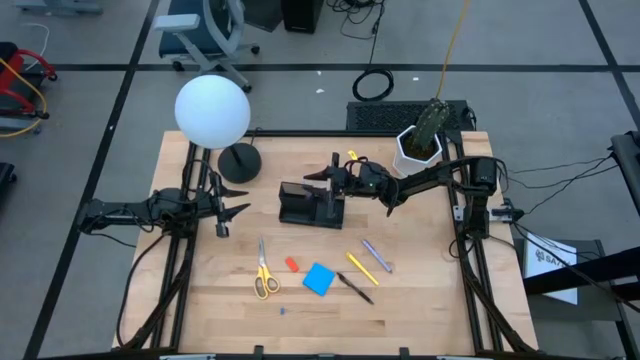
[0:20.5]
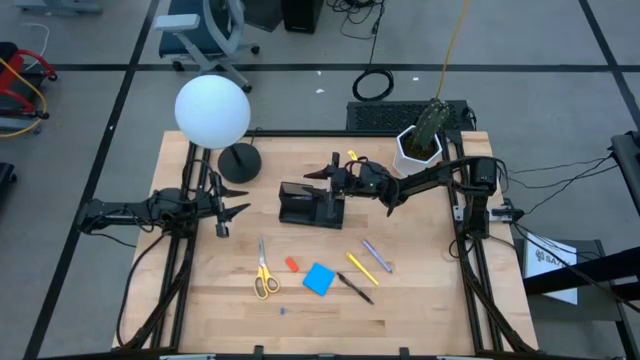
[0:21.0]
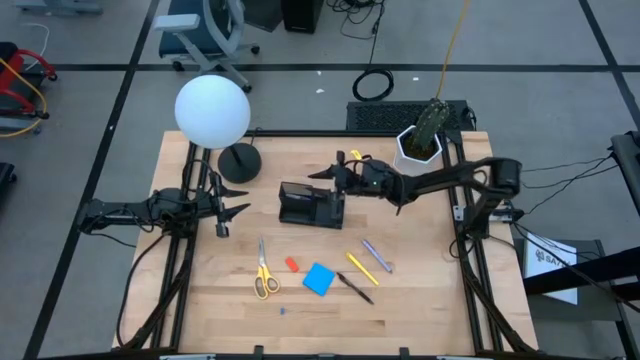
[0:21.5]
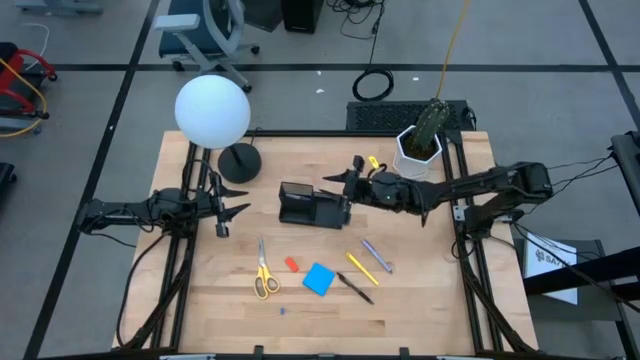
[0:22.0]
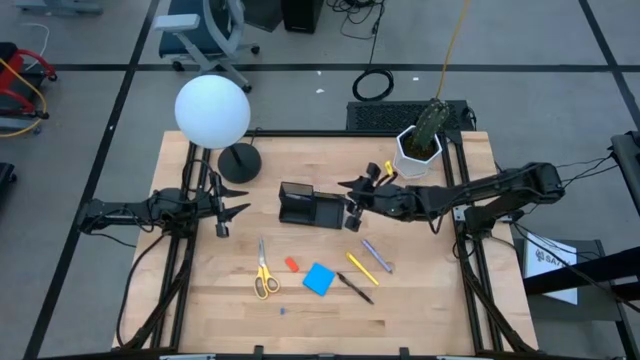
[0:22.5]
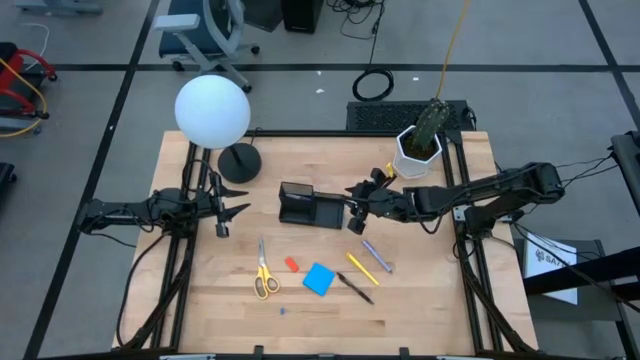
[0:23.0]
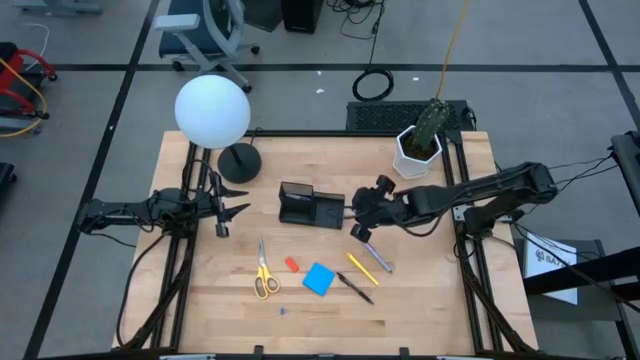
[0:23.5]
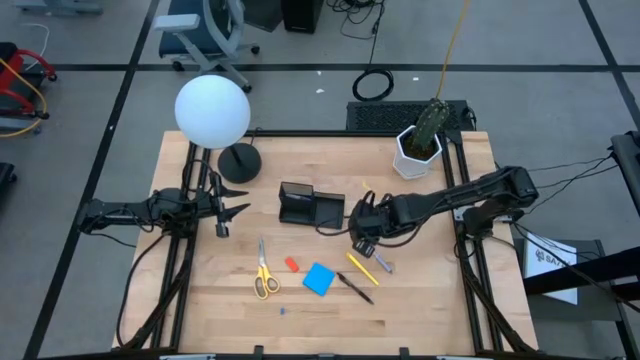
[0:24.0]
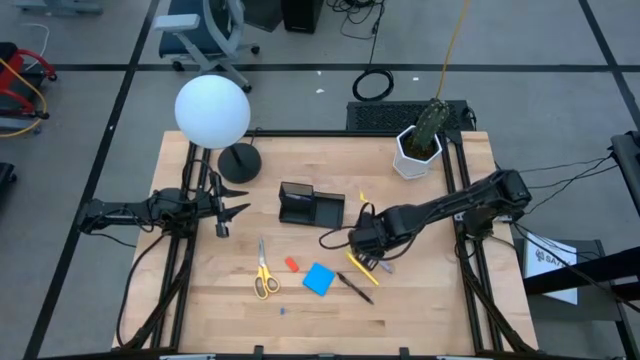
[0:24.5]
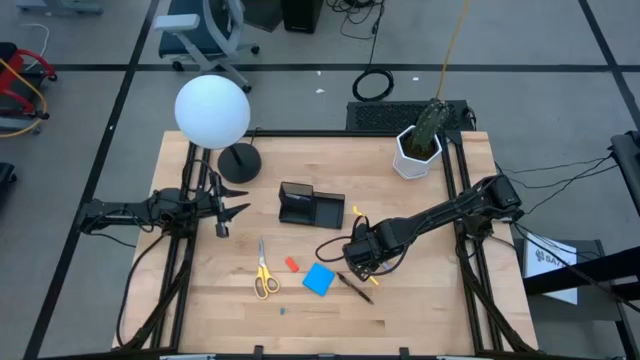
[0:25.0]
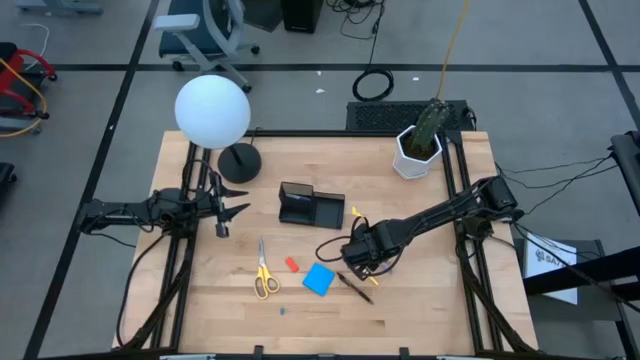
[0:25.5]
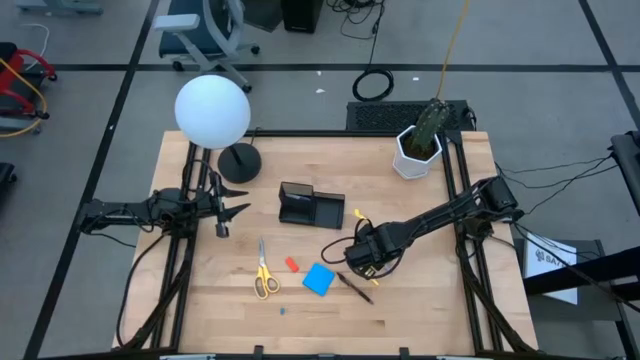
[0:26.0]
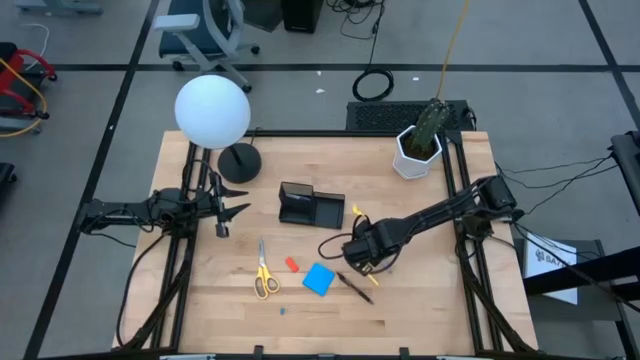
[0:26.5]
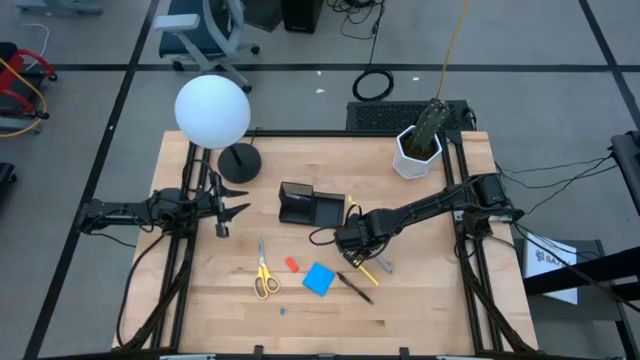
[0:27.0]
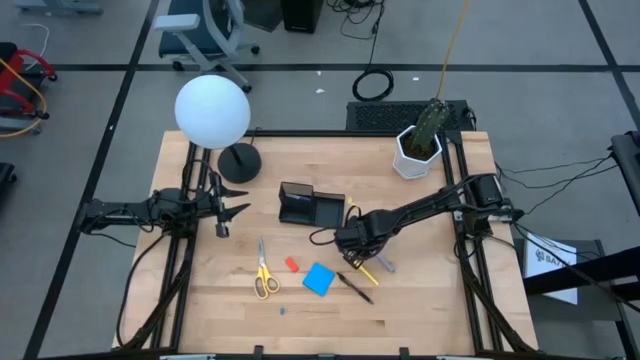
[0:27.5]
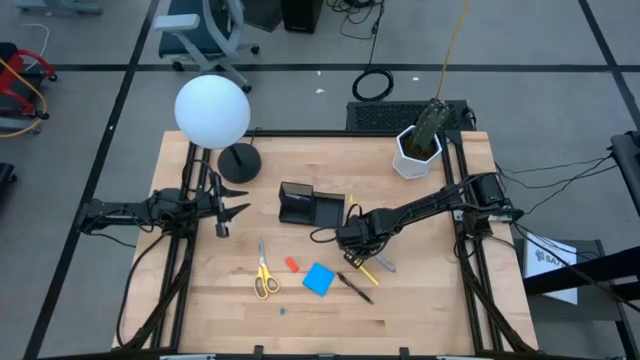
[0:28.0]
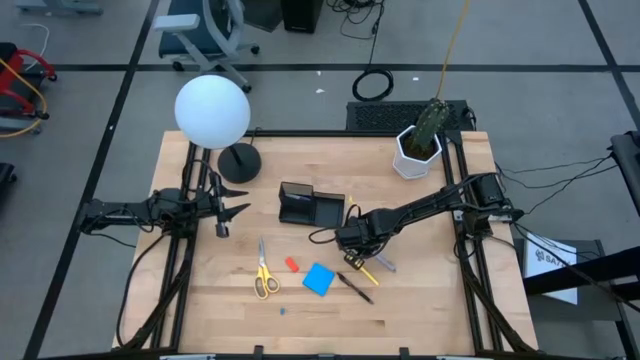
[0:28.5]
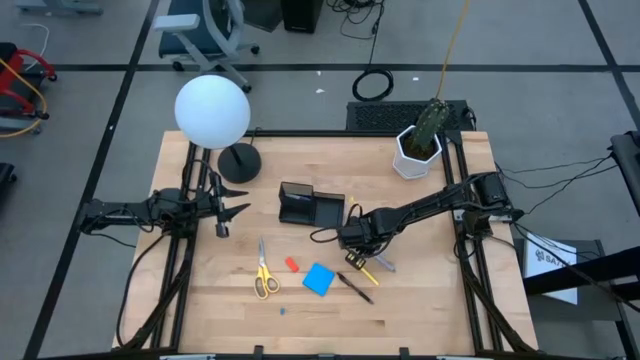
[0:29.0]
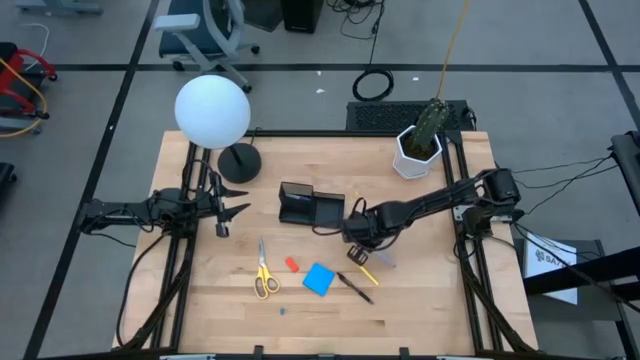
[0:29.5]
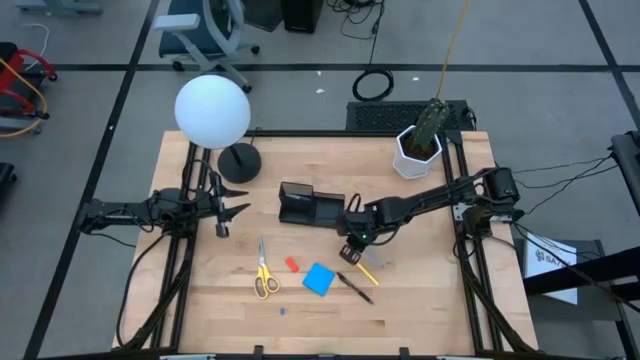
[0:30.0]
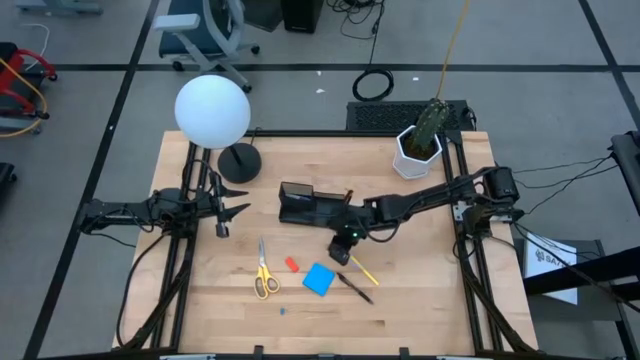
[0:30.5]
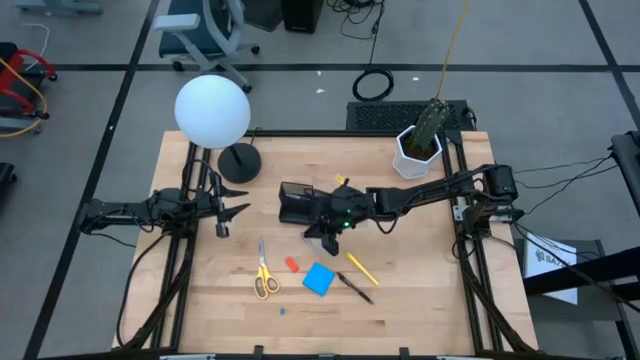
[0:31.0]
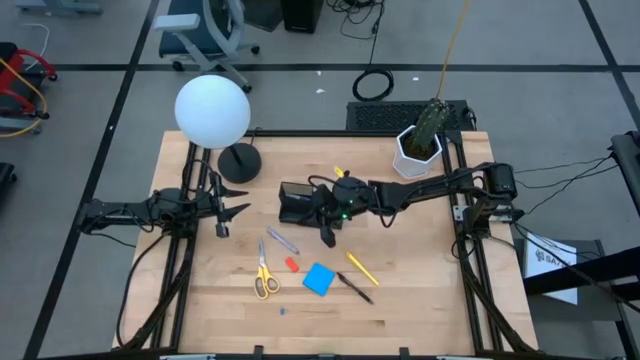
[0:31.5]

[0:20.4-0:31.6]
Task: Pick and place office supplies into organizer
Put the purple pen into the desk organizer

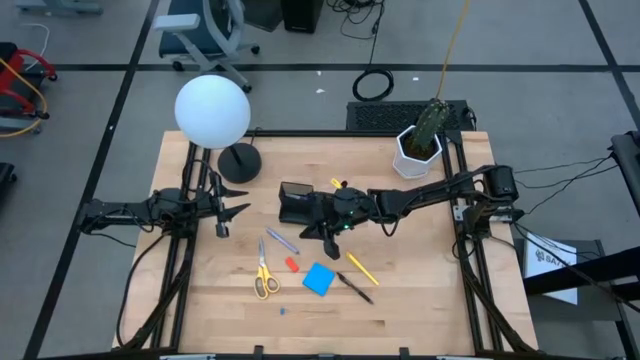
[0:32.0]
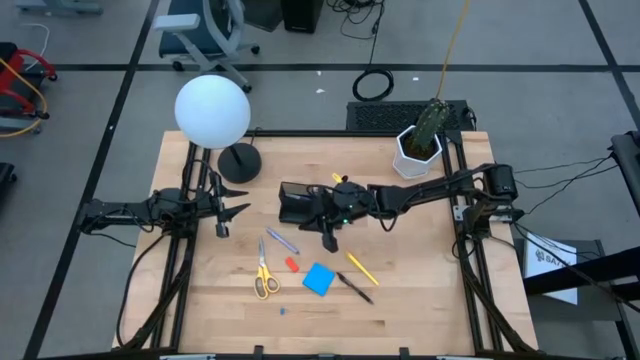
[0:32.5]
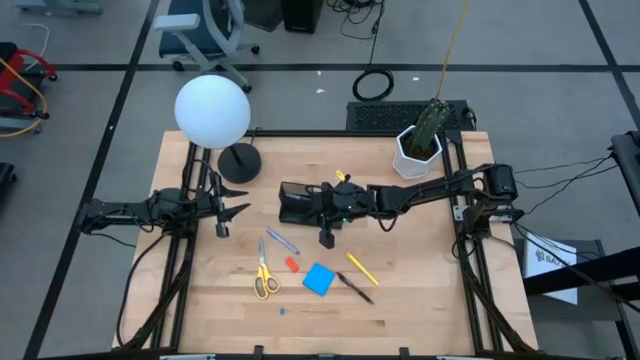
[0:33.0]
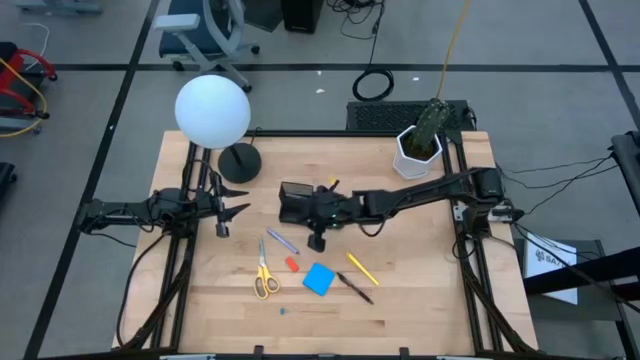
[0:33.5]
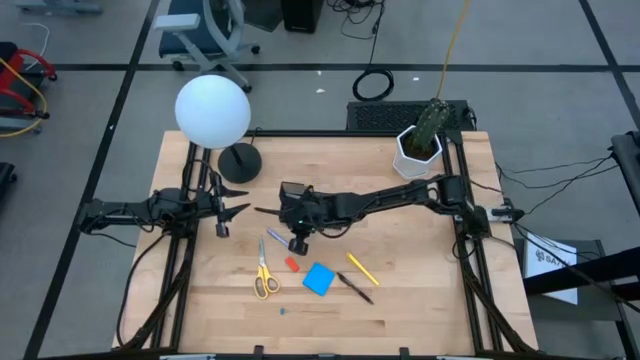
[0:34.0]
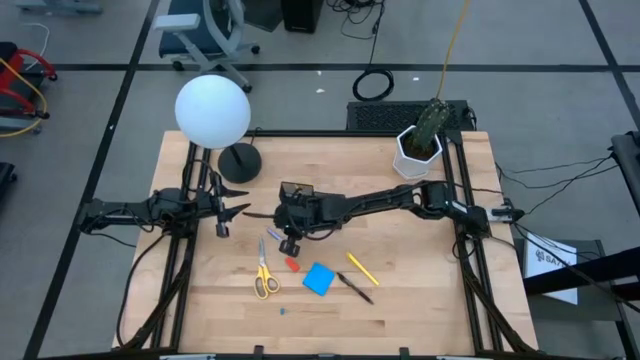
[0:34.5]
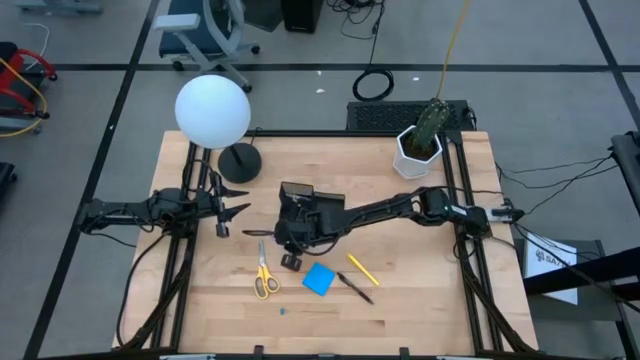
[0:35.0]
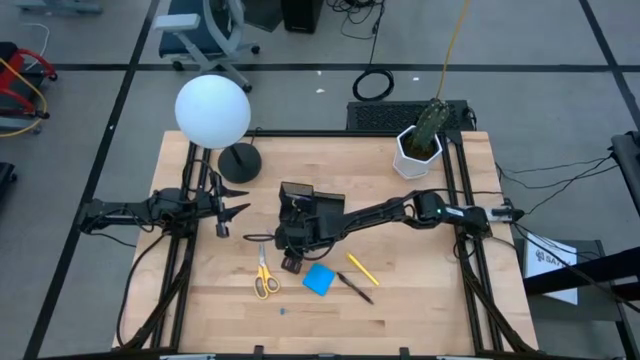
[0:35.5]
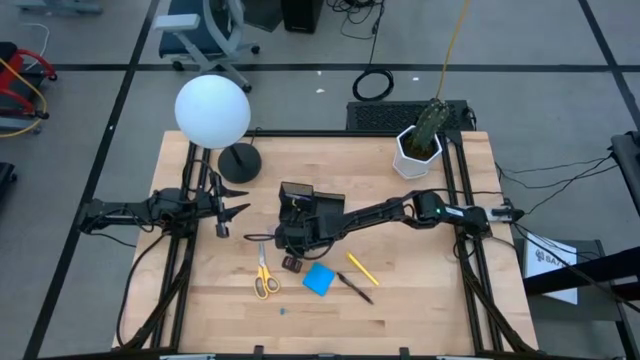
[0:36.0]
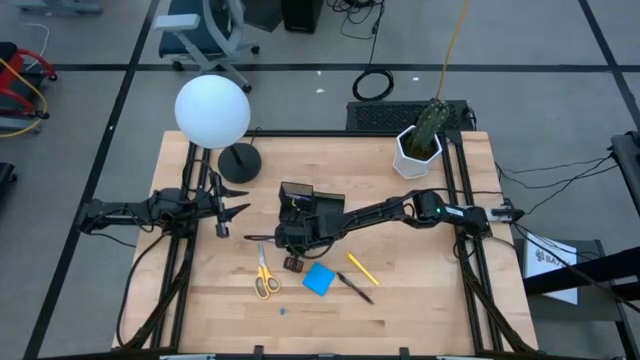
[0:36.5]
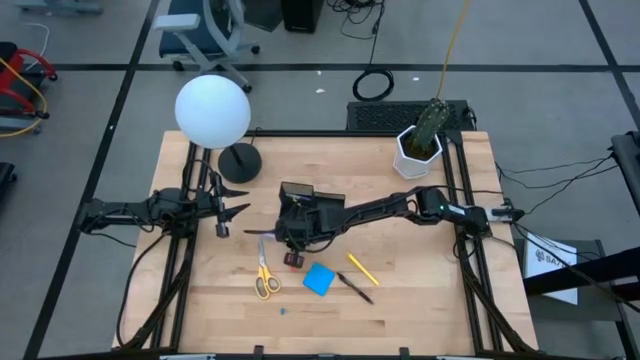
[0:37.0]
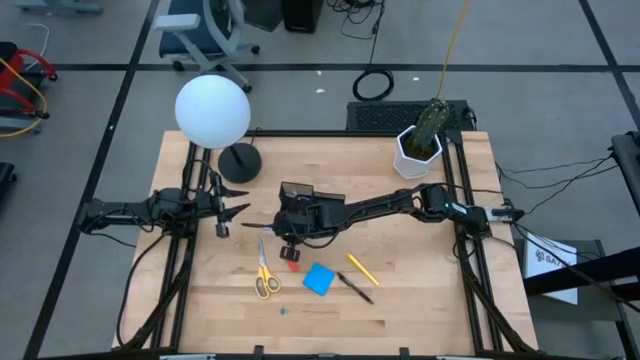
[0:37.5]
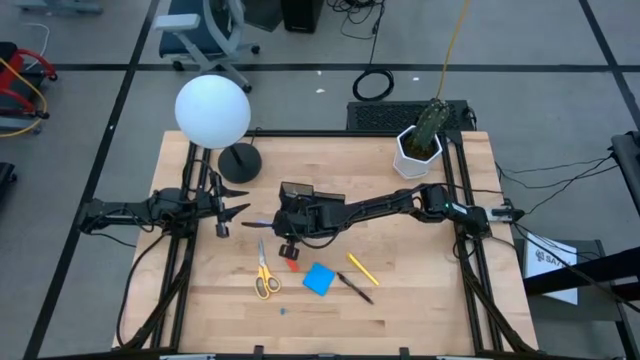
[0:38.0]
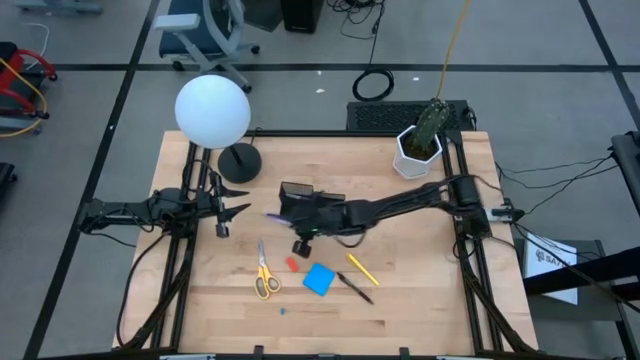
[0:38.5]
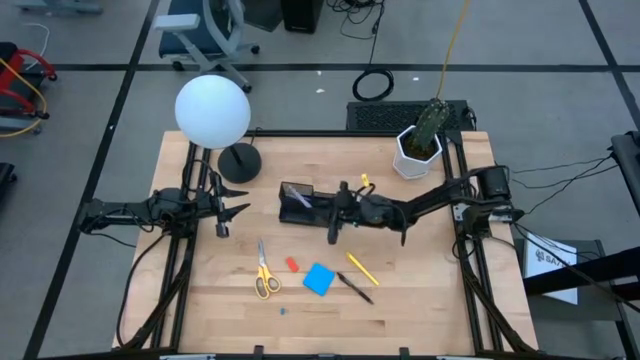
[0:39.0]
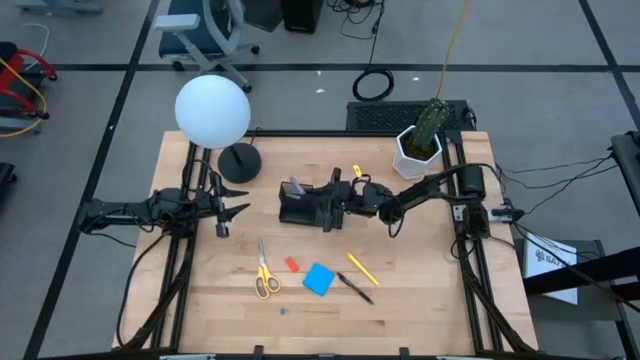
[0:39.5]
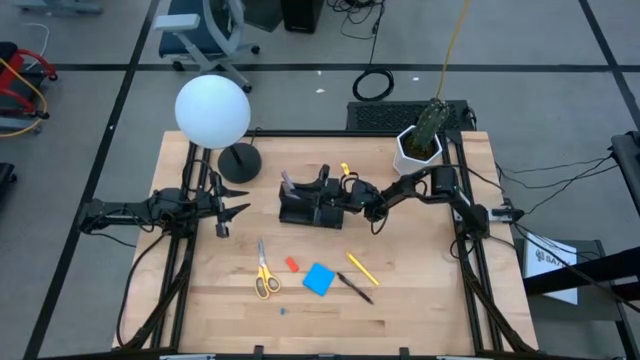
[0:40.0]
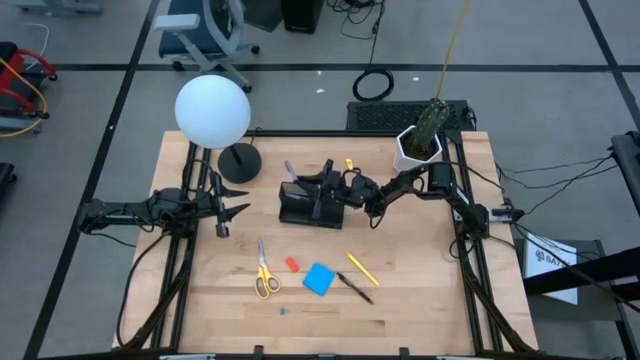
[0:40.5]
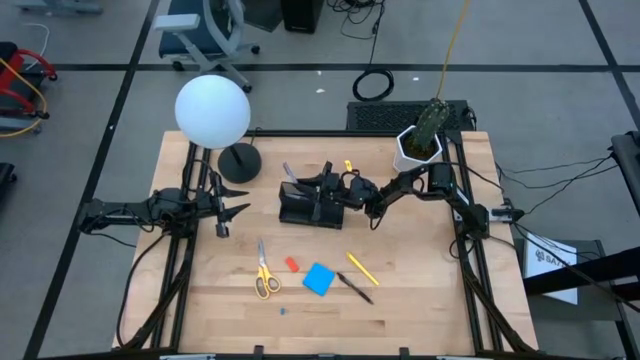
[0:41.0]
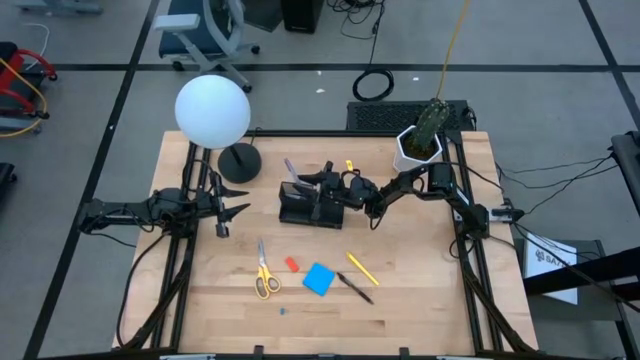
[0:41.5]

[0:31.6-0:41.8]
Put the purple pen into the desk organizer
